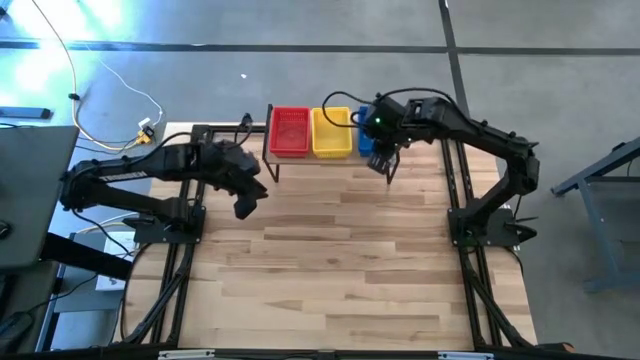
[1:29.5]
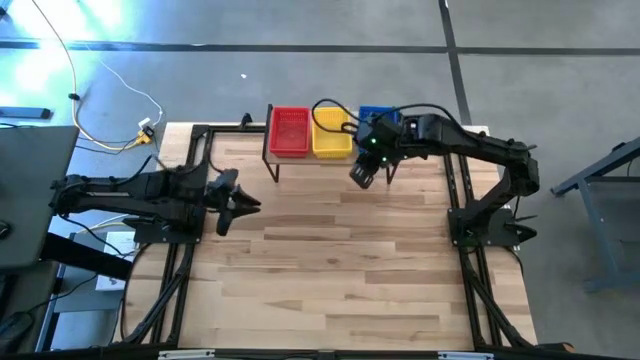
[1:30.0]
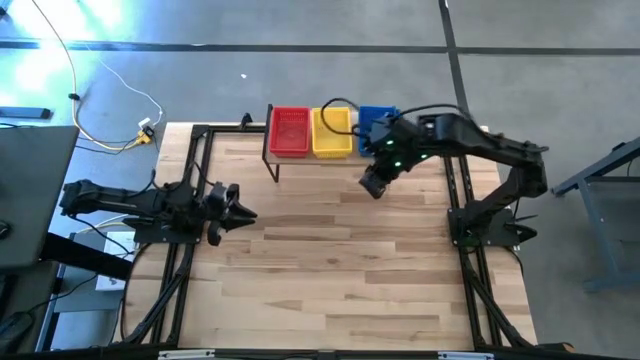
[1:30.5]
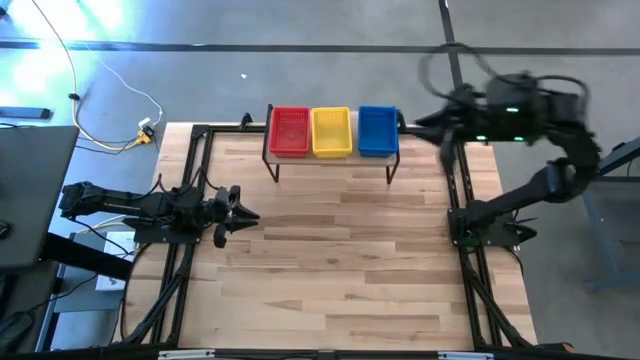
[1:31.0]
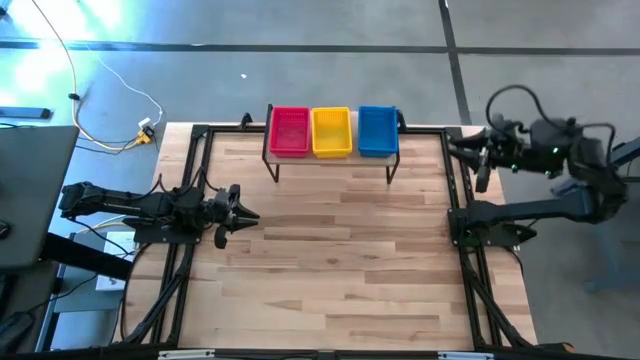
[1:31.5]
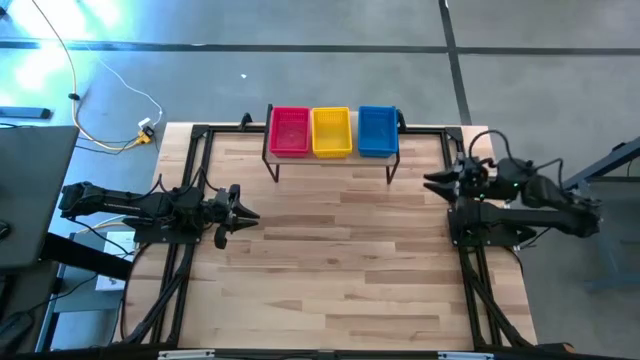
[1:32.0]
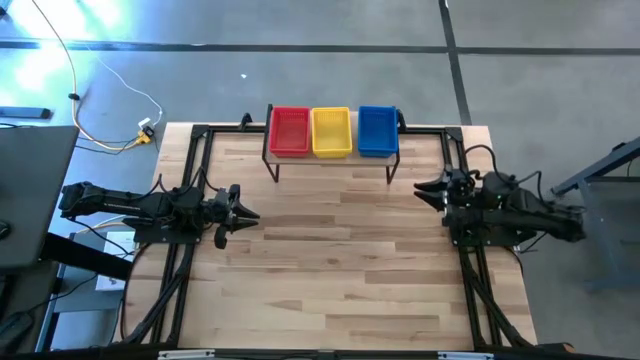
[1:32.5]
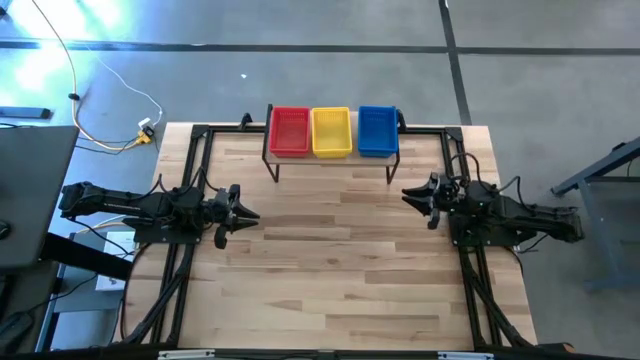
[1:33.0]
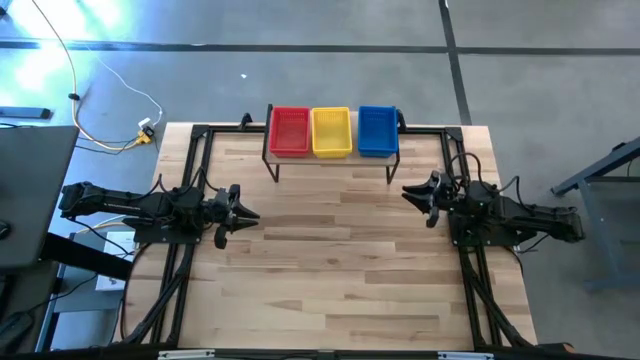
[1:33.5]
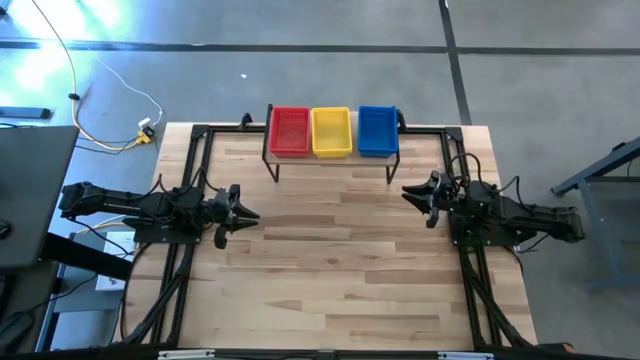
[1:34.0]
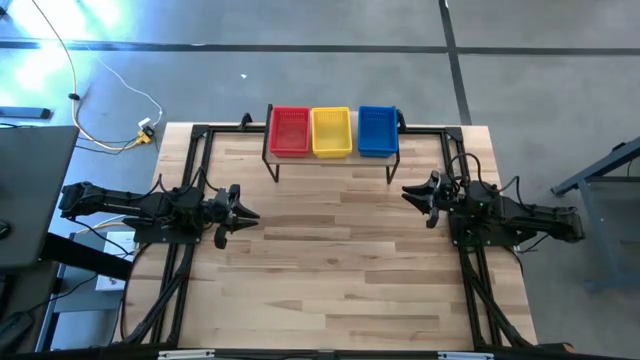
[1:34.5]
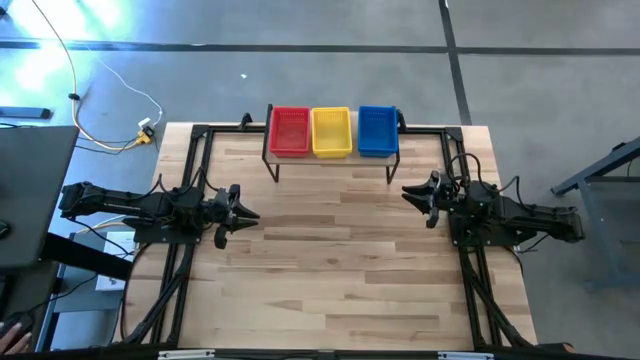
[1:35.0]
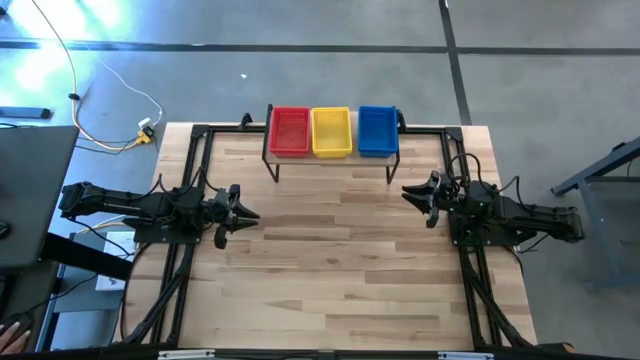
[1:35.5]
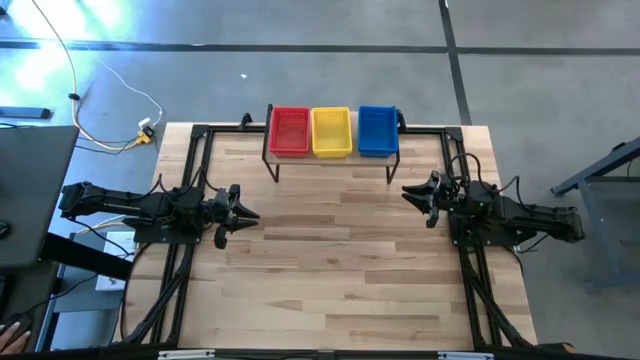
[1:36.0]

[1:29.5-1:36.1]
Task: Stack baskets on shelf by color
Return to Home Position

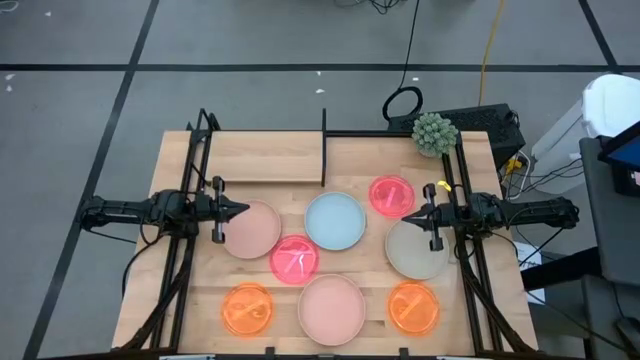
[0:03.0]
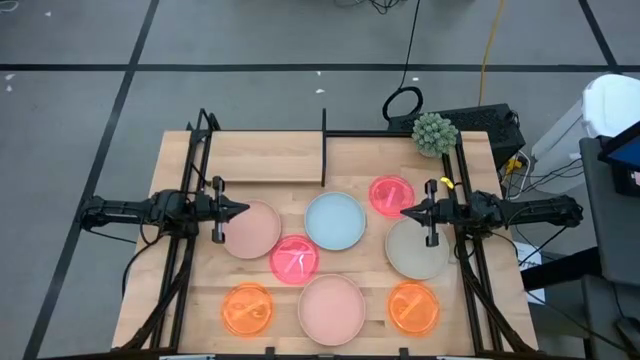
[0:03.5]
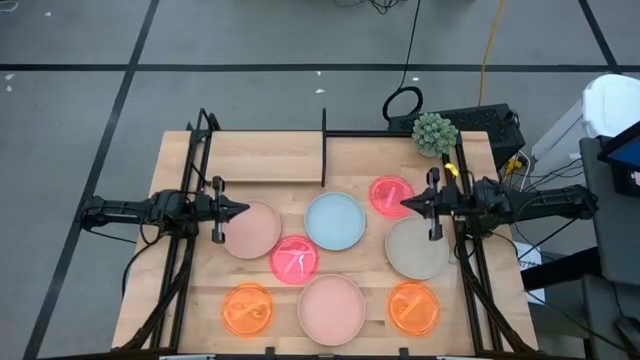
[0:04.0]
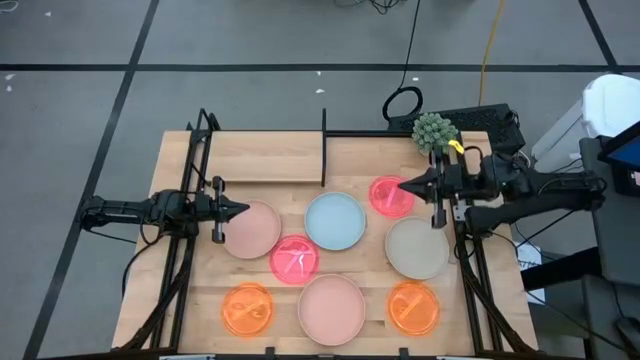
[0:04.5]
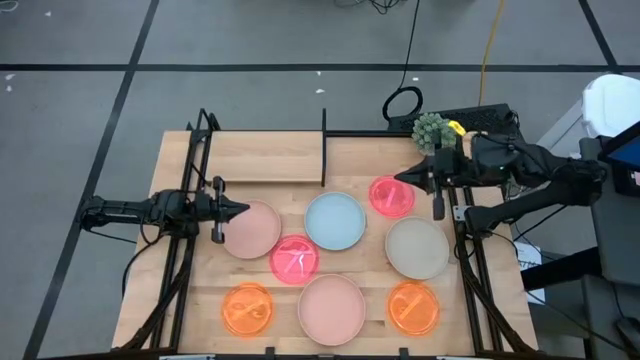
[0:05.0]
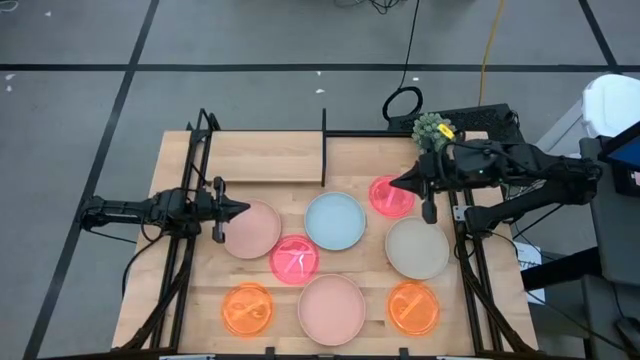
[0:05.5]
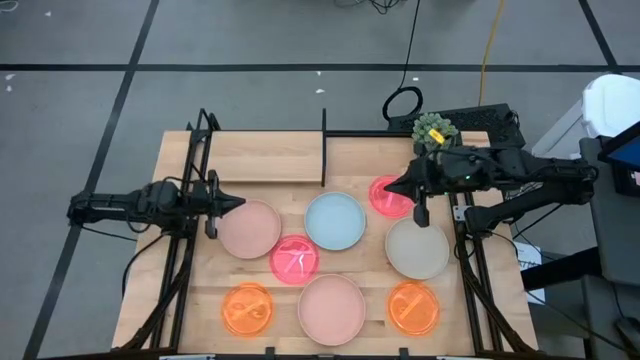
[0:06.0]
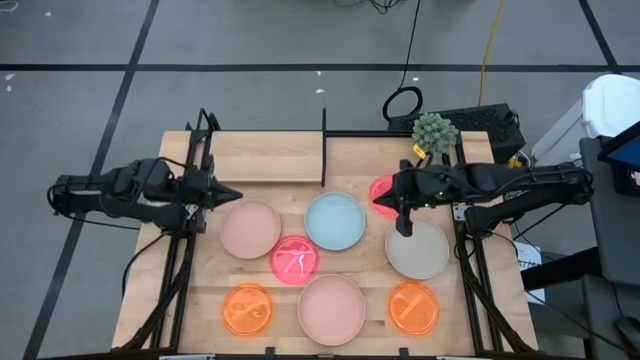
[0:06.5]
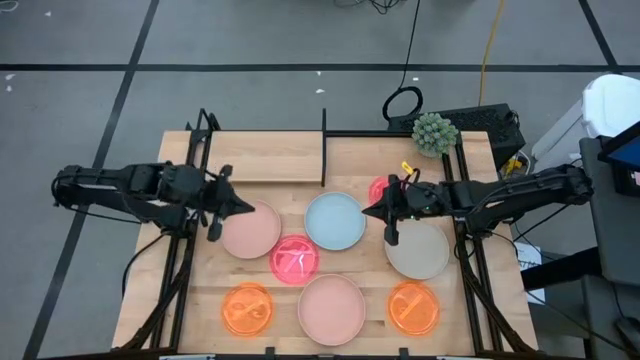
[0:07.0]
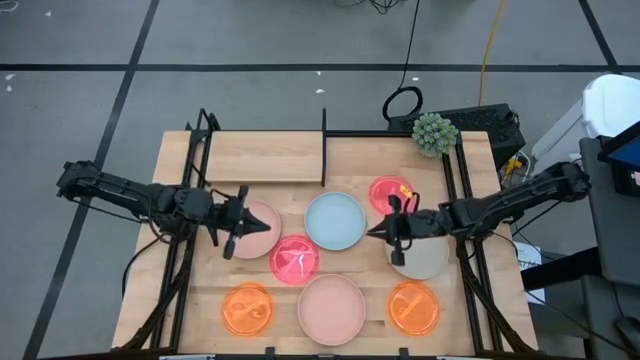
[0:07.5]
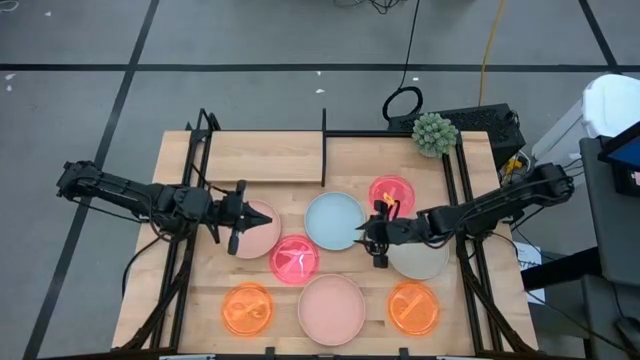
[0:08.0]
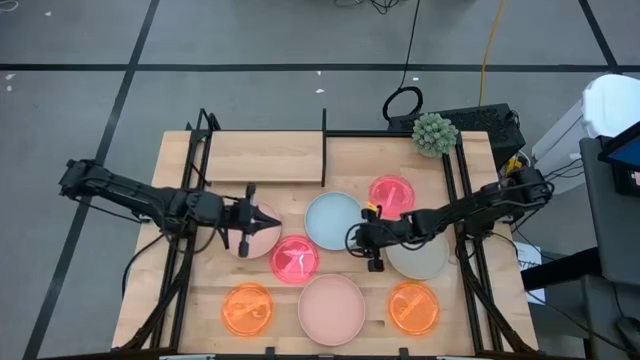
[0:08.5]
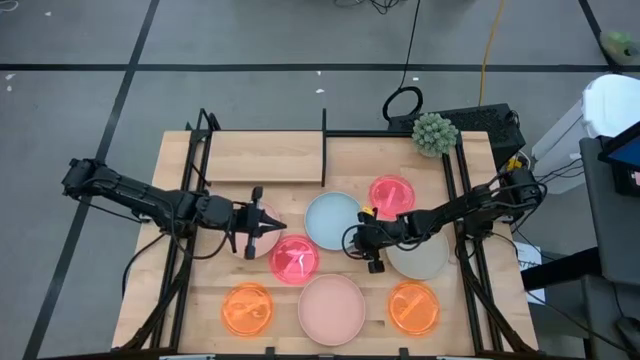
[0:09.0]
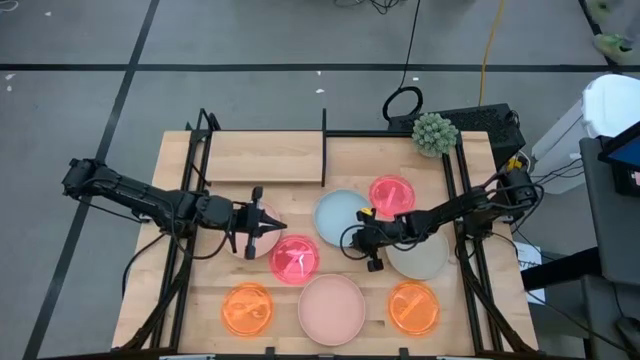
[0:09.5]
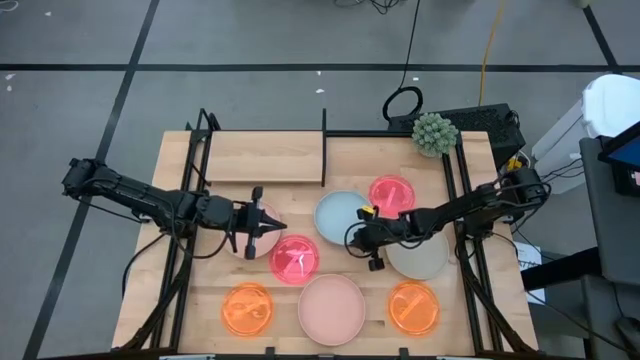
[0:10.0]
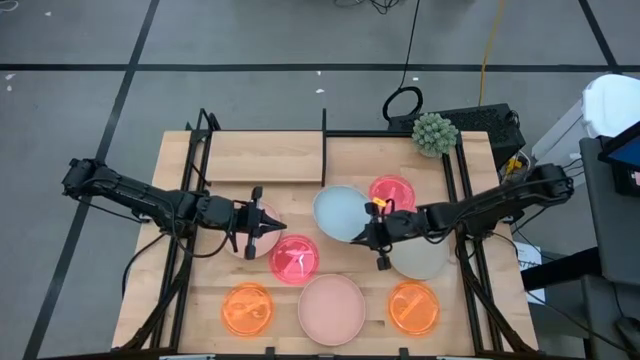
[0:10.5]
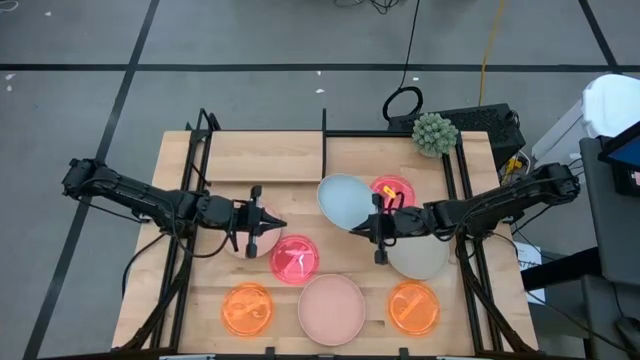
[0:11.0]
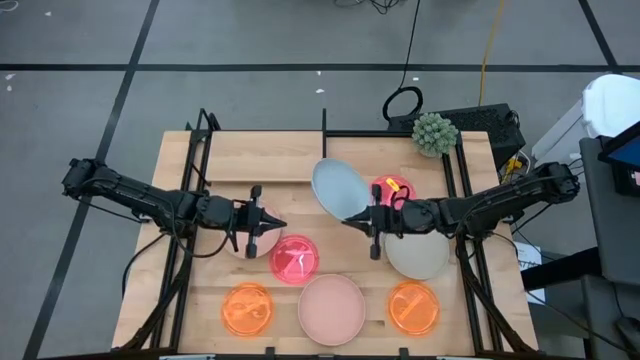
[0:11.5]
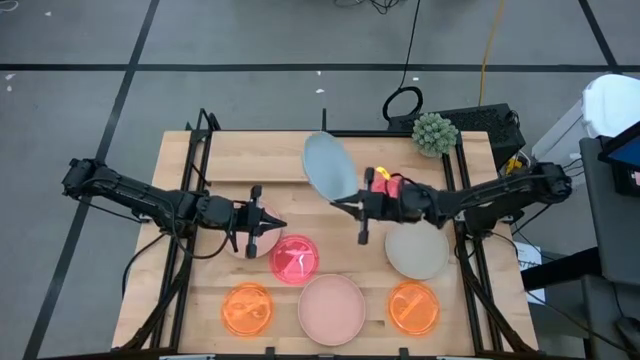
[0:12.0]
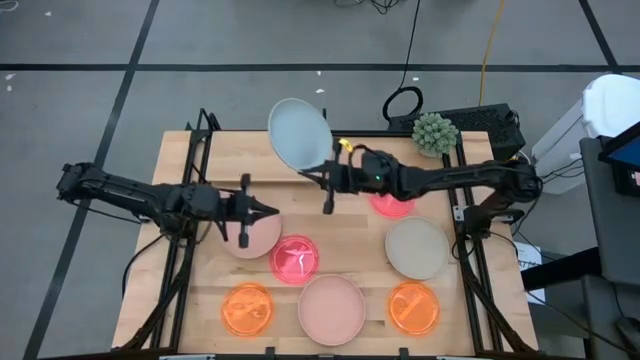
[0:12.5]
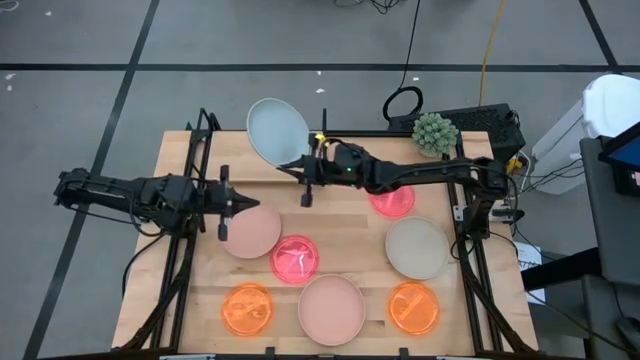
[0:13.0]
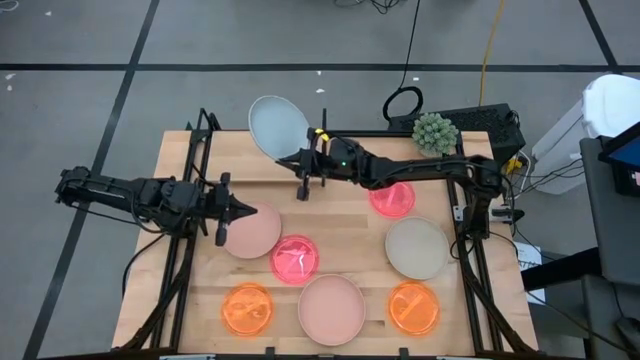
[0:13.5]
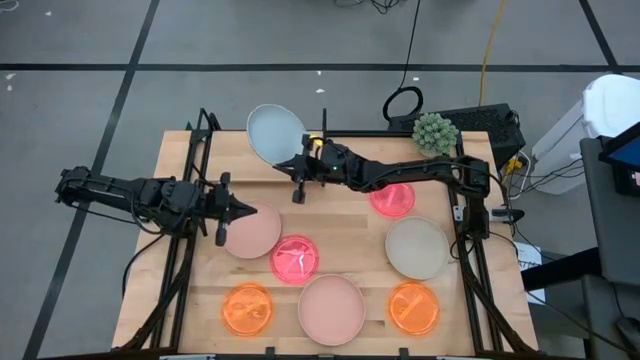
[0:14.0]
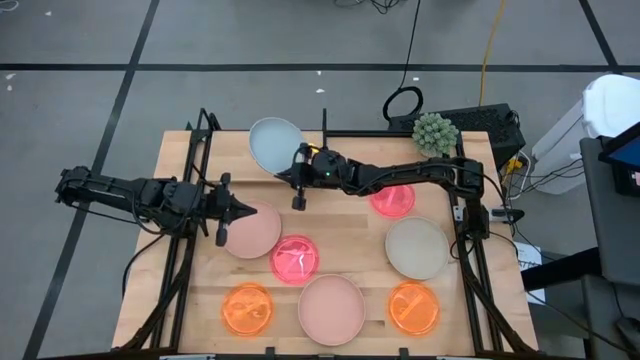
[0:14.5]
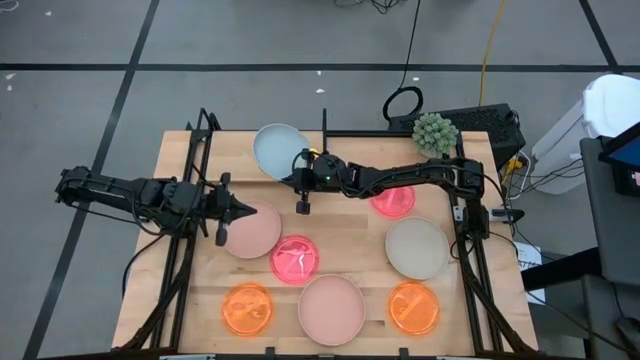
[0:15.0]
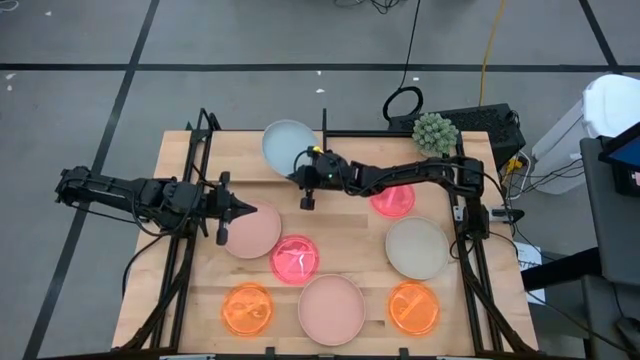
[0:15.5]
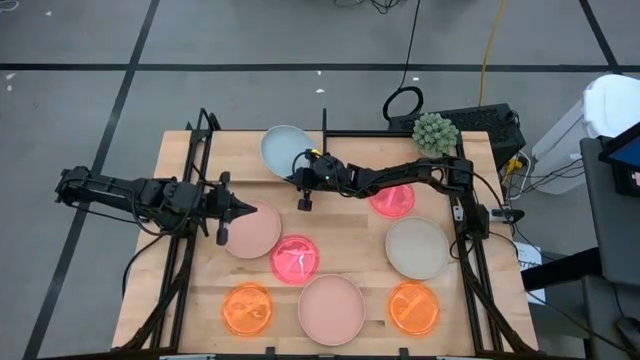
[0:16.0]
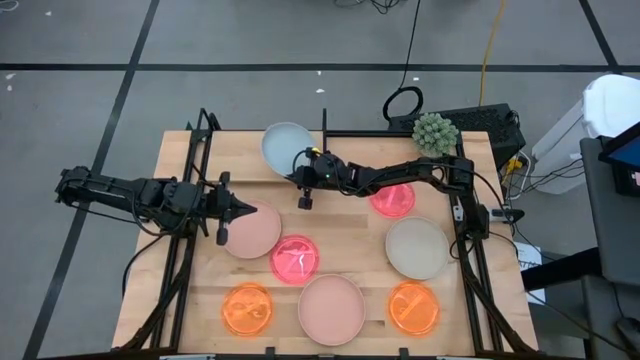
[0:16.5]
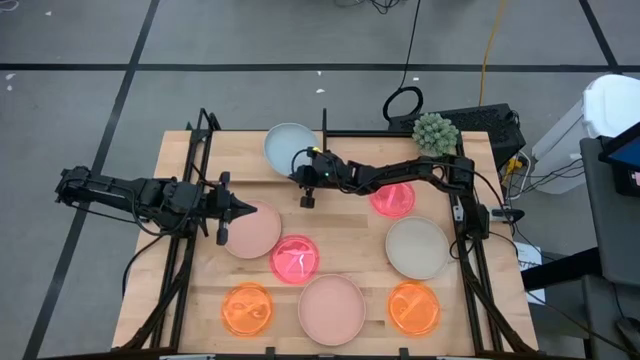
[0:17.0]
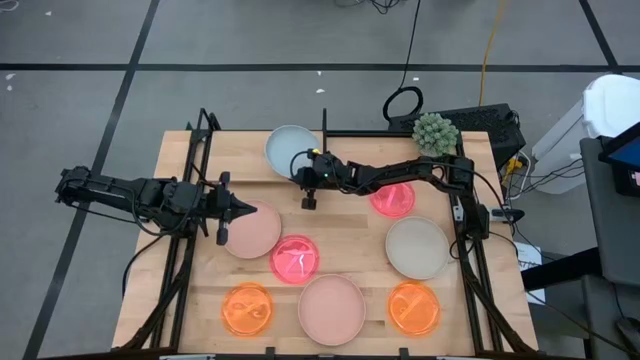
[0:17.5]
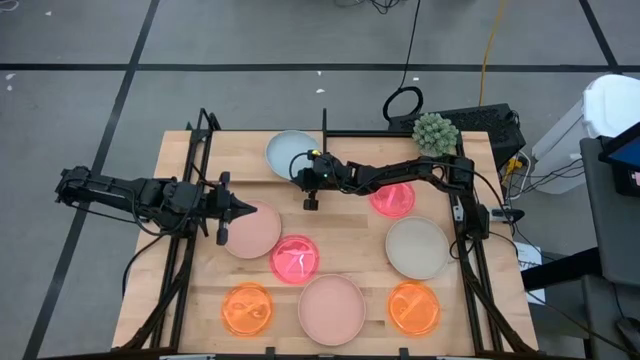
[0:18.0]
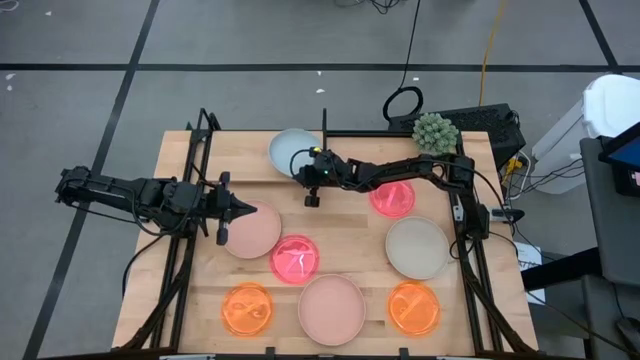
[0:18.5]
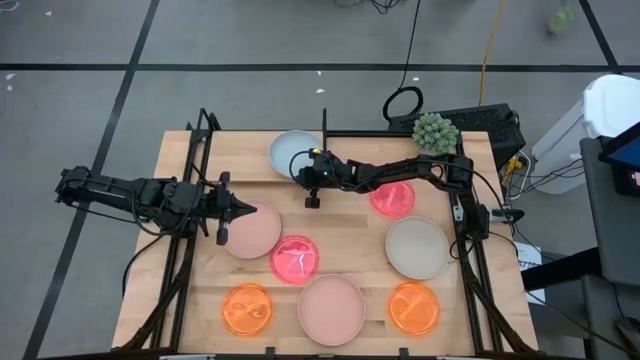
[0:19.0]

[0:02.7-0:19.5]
Task: Place and stack plates onto a shelf
Put the blue plate on the shelf
